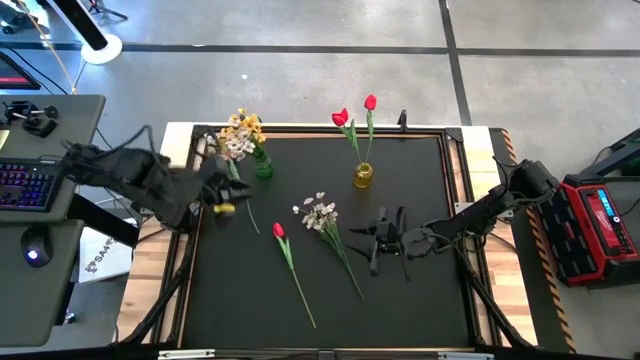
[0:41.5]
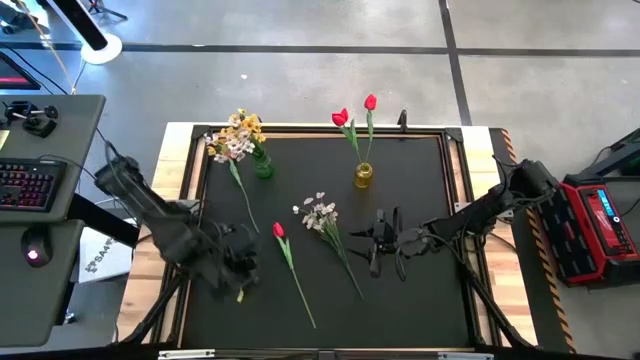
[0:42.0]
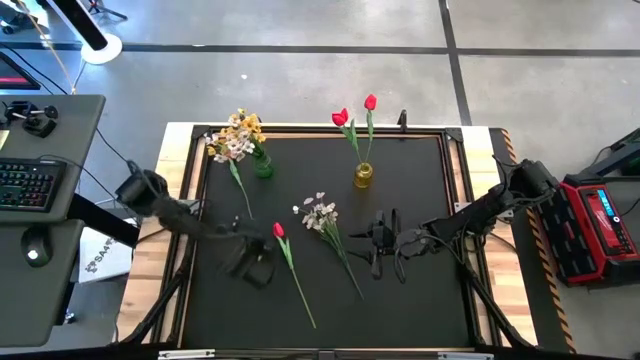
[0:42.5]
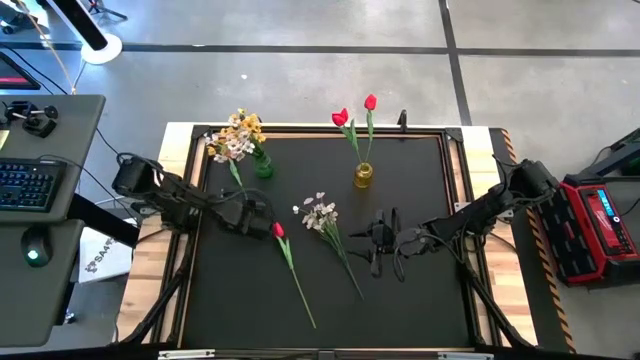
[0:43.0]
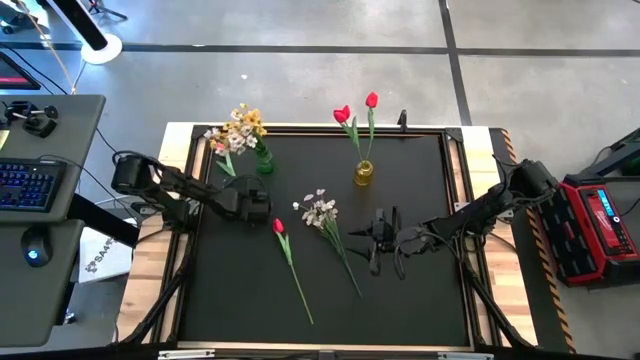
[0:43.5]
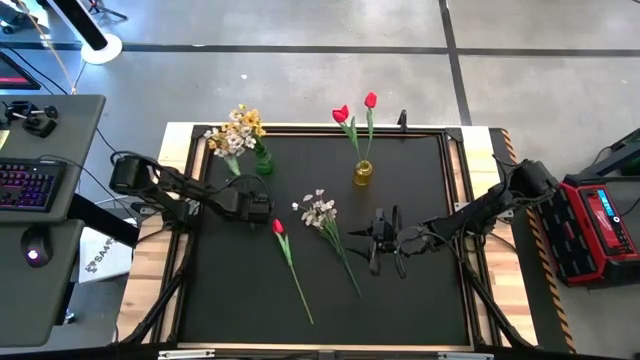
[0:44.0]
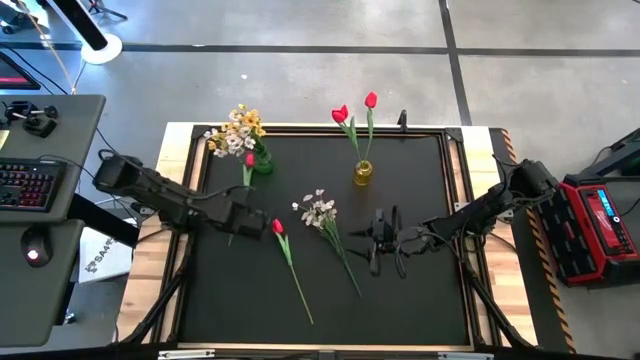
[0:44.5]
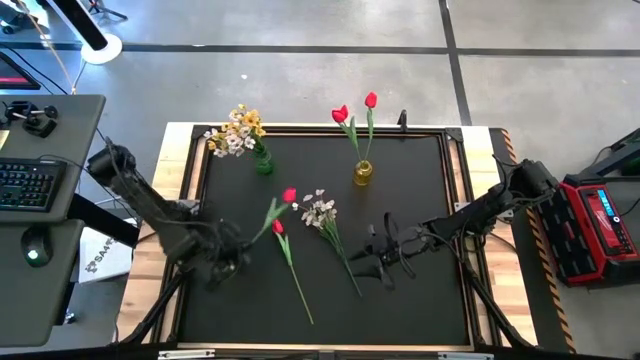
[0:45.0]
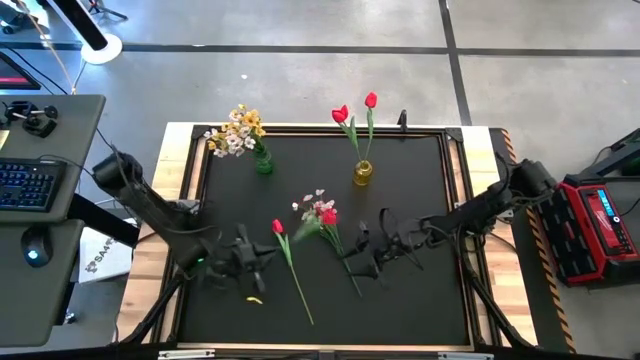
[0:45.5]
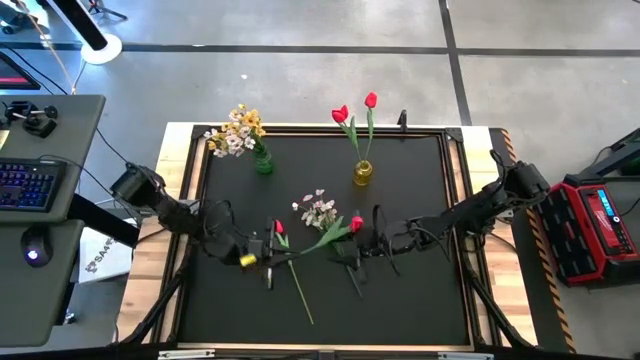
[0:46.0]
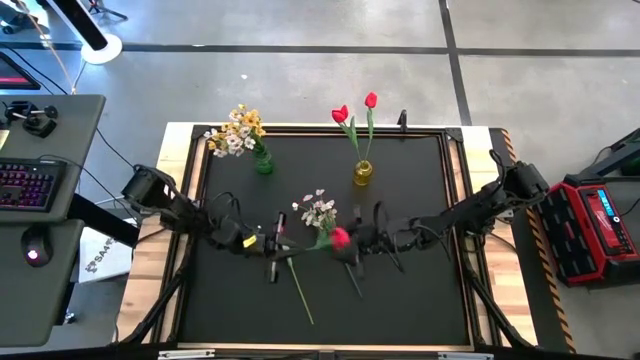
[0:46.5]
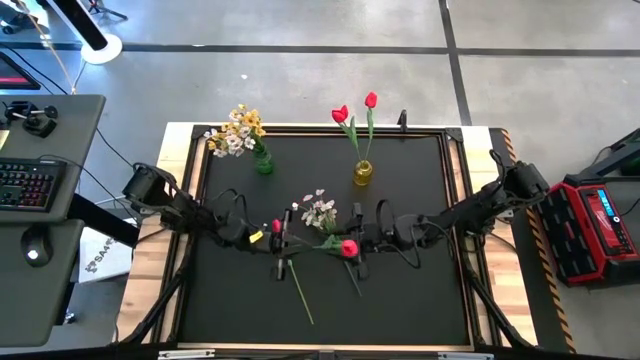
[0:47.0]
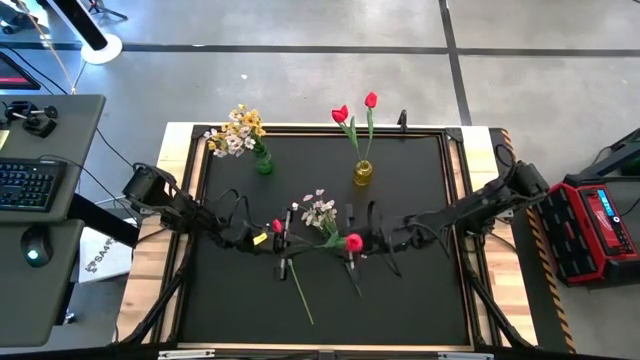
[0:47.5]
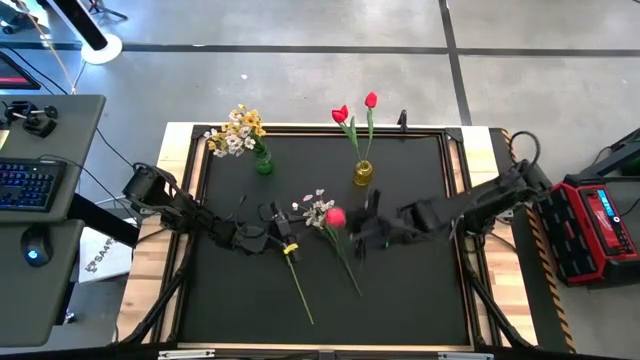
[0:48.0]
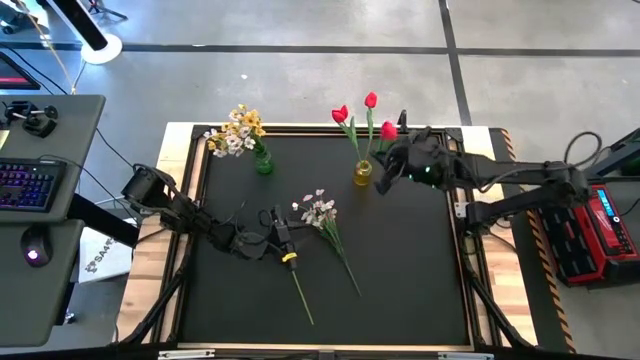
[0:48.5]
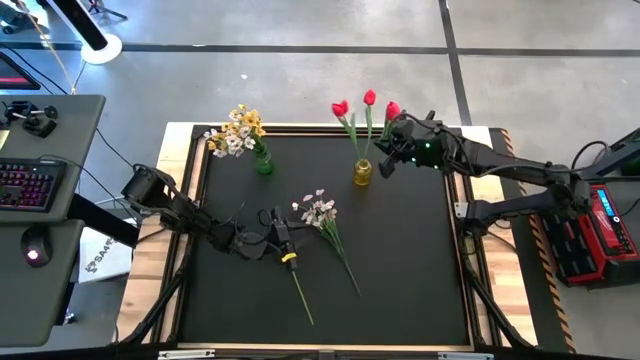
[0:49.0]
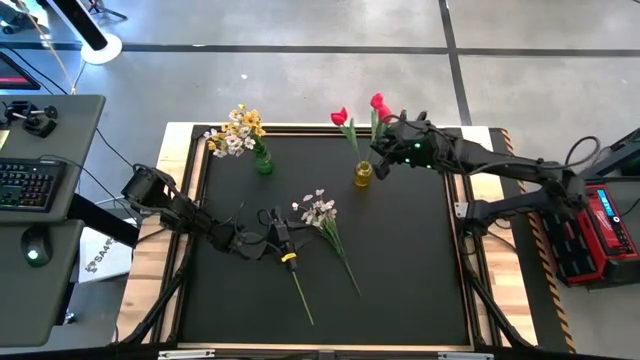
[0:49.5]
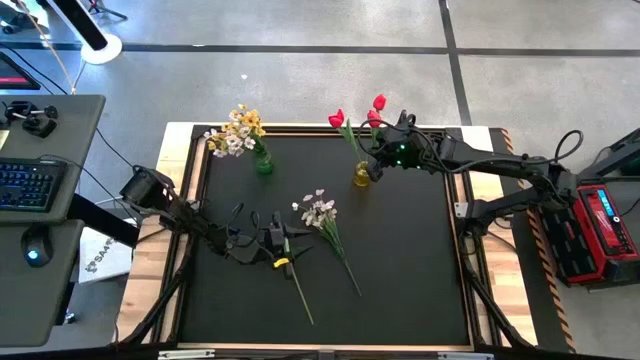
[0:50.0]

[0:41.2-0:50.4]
Task: Sort flowers into vase by color
Put the top red flower into the yellow vase

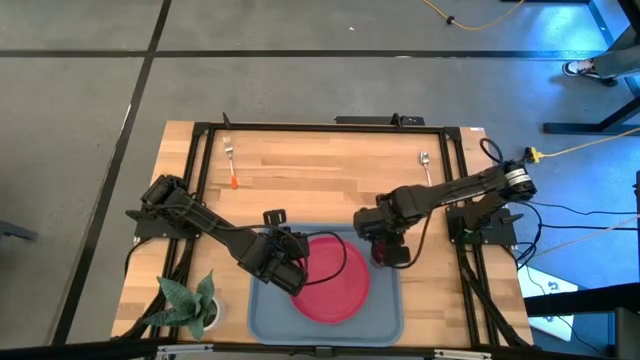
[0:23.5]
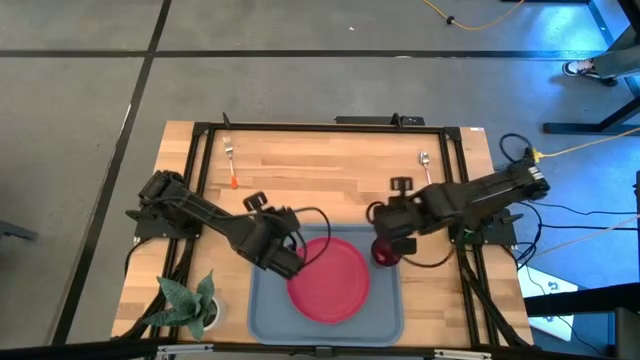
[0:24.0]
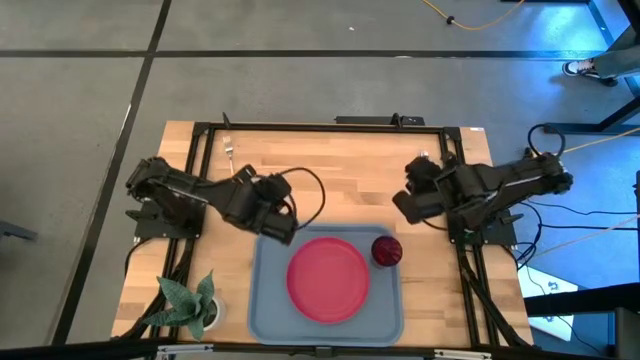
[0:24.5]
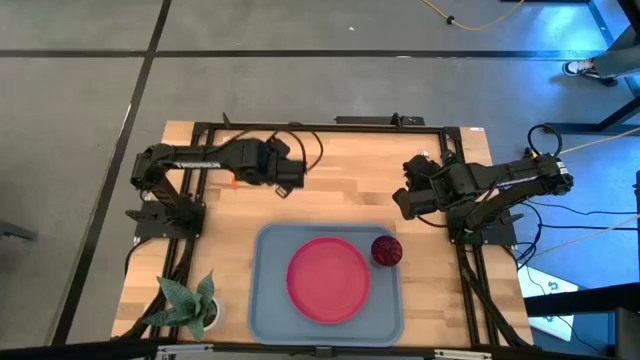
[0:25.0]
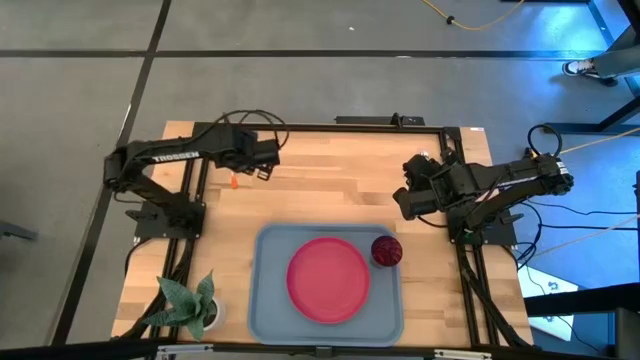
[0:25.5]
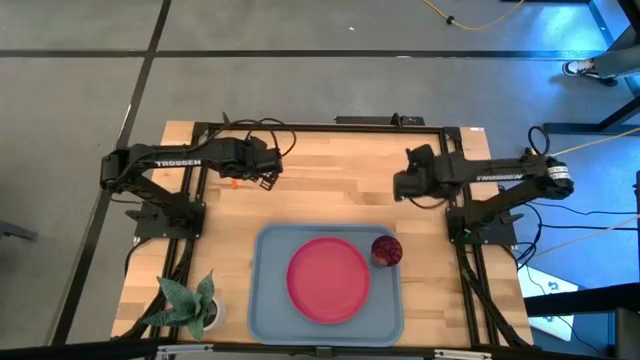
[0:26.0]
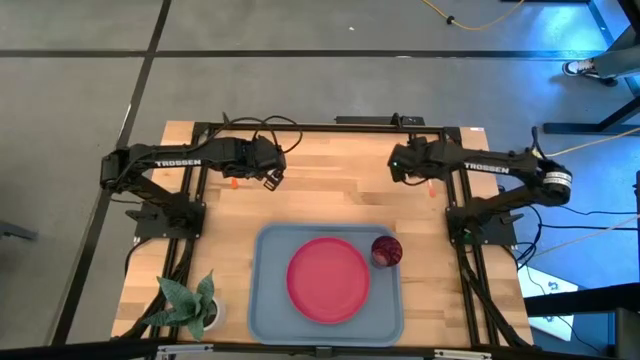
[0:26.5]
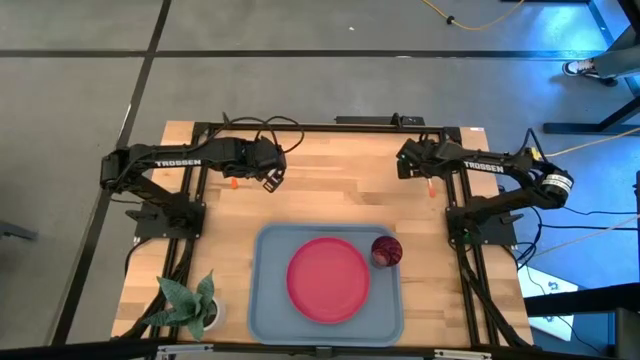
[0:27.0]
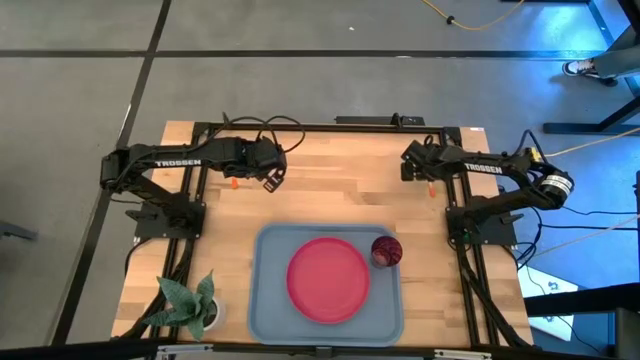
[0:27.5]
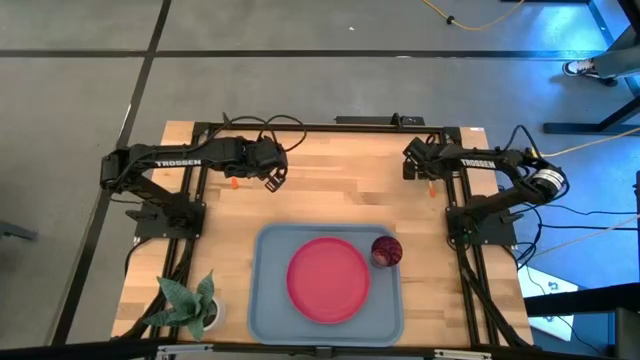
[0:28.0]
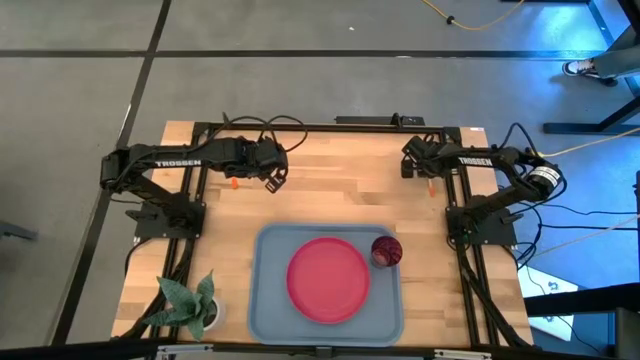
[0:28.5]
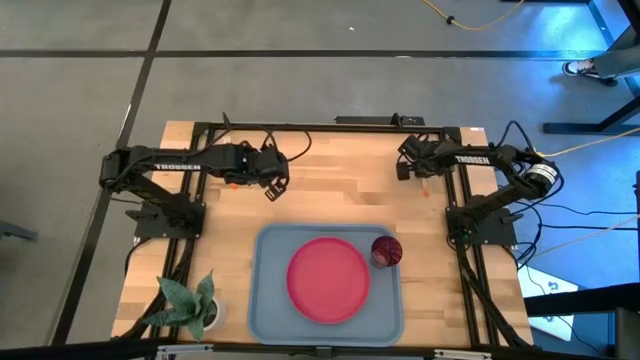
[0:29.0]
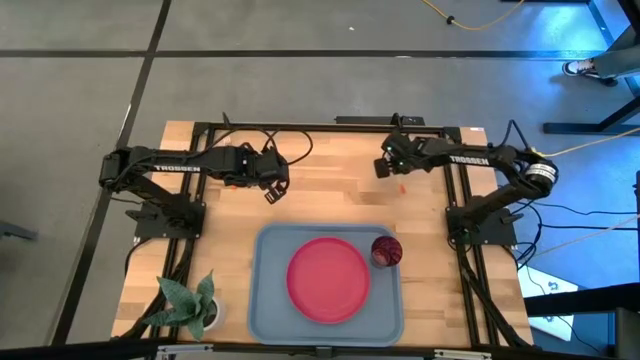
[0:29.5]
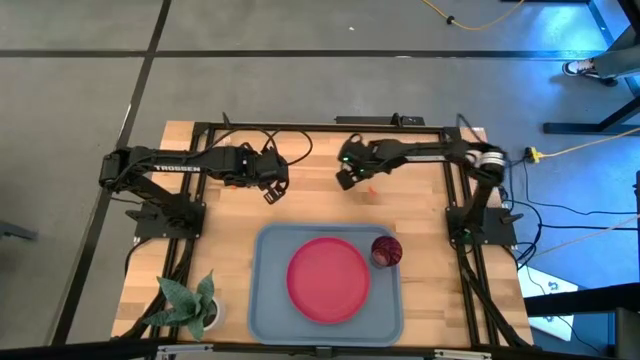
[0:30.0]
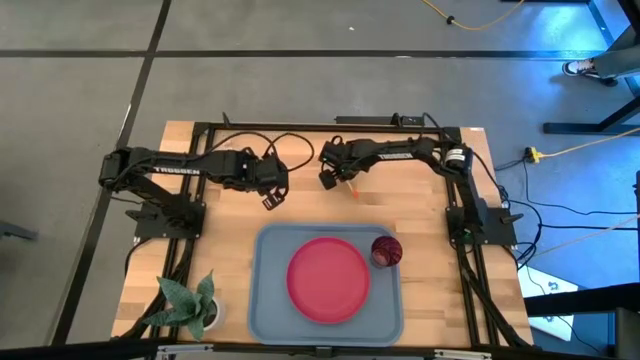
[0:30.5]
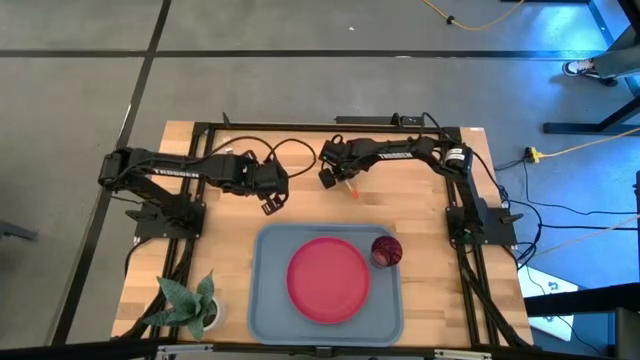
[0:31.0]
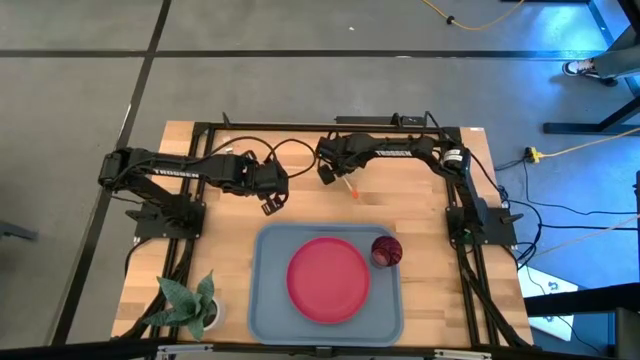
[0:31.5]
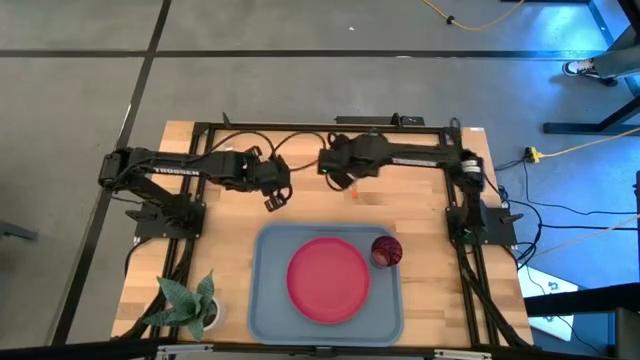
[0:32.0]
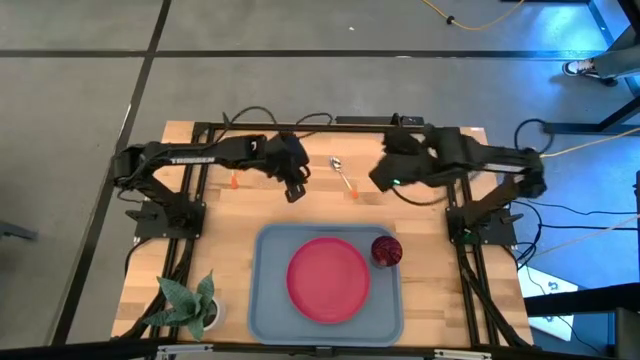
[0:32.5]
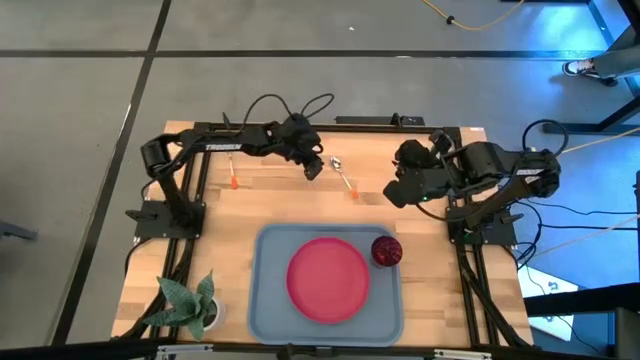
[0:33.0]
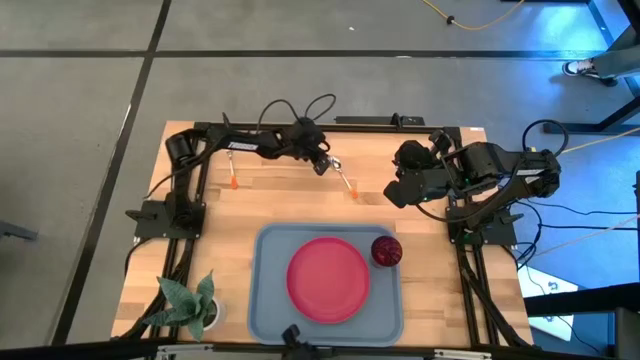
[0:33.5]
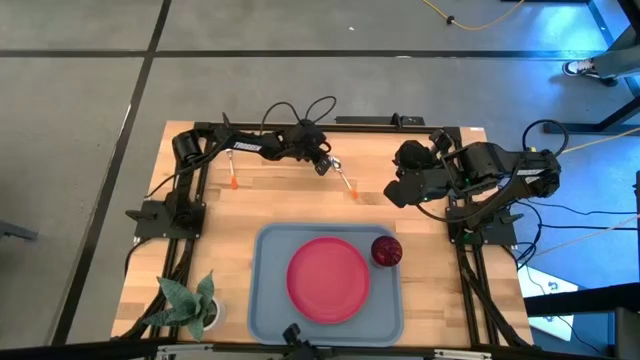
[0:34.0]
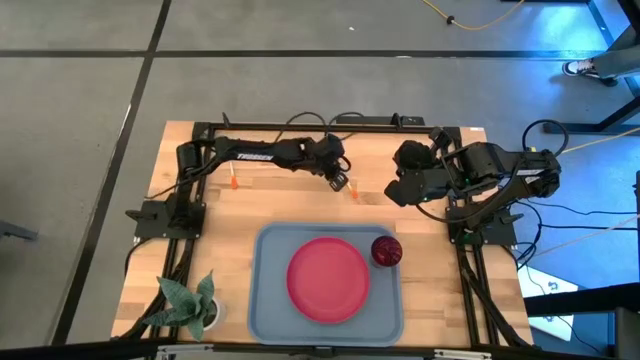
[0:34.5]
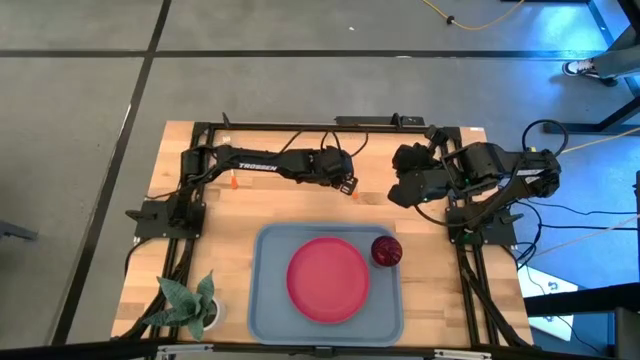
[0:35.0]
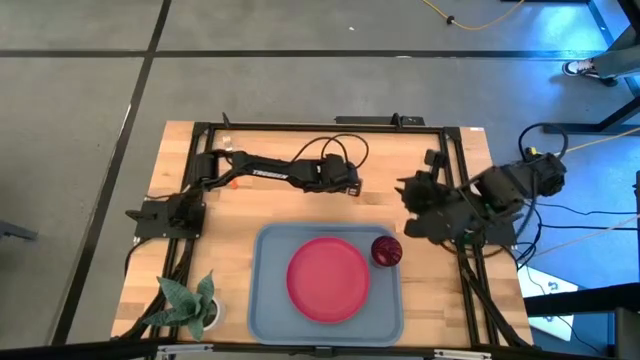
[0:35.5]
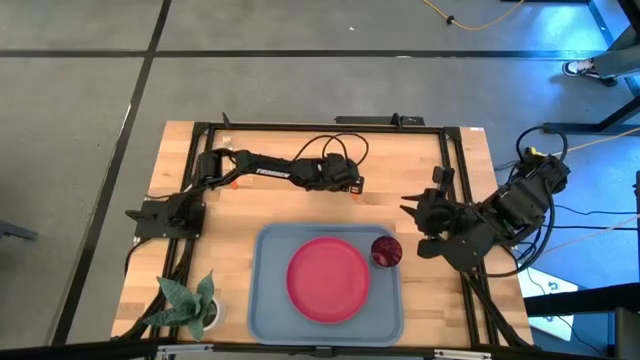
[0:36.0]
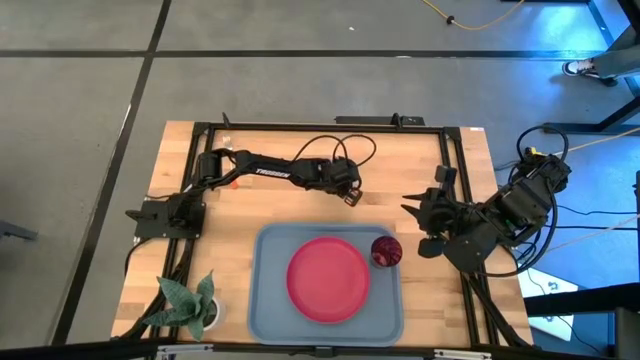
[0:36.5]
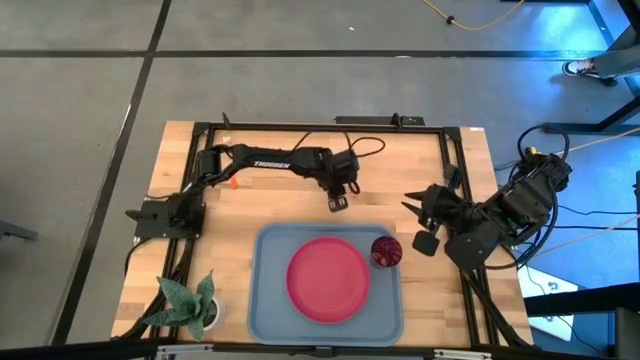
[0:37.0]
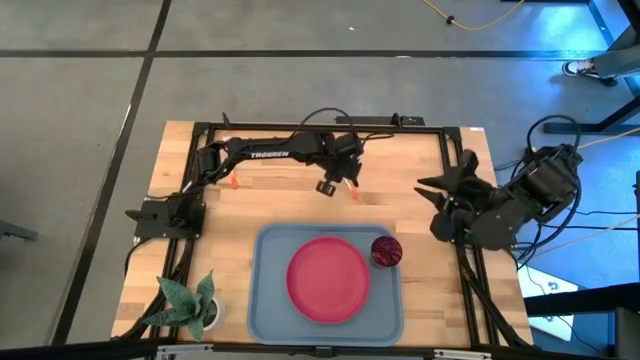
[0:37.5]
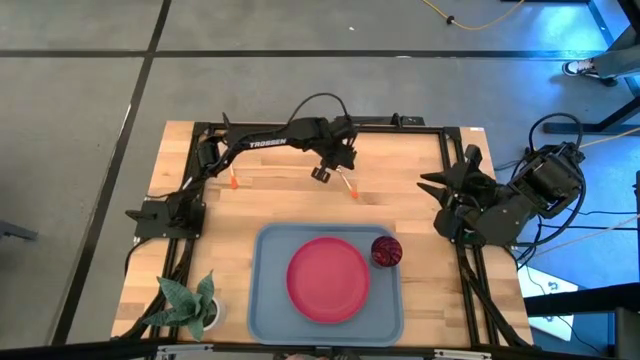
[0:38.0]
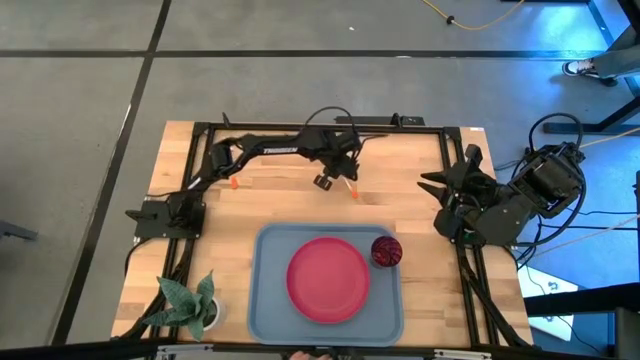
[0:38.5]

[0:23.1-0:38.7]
Task: Pick and place plate/cup/fork/spoon on tray
Put the orange spoon on the blue serving tray to the left of the pink plate
